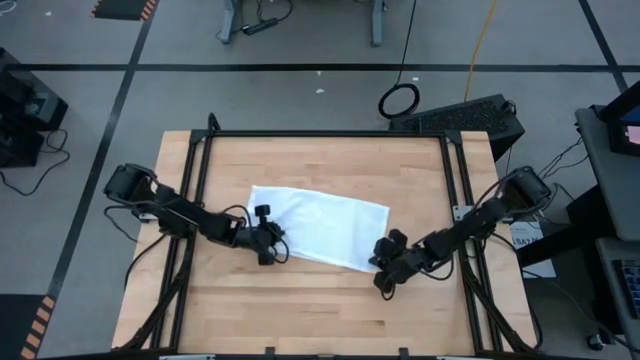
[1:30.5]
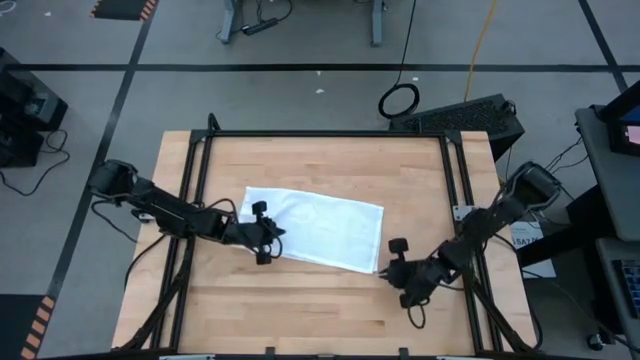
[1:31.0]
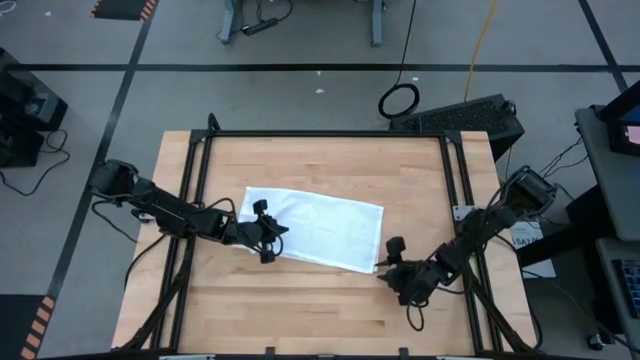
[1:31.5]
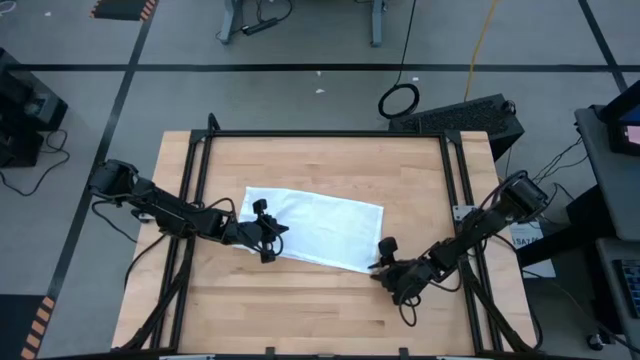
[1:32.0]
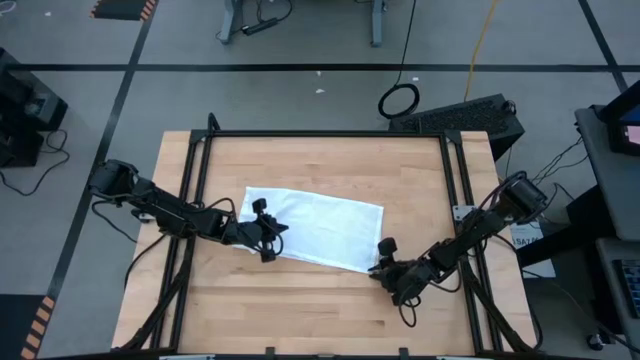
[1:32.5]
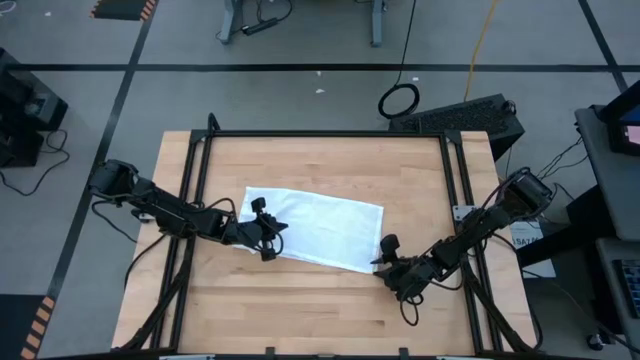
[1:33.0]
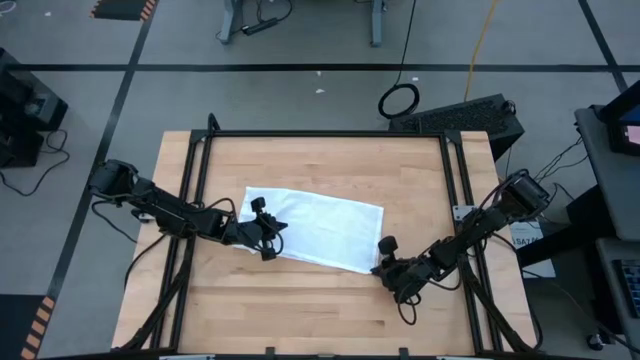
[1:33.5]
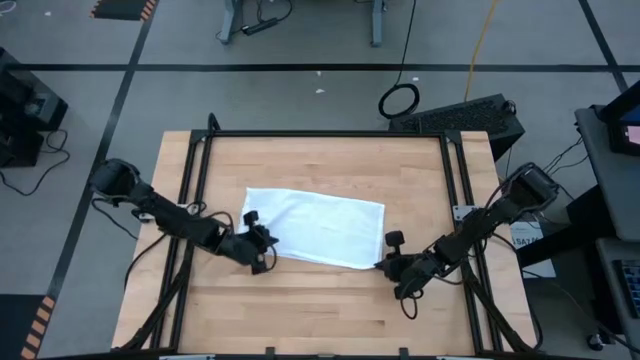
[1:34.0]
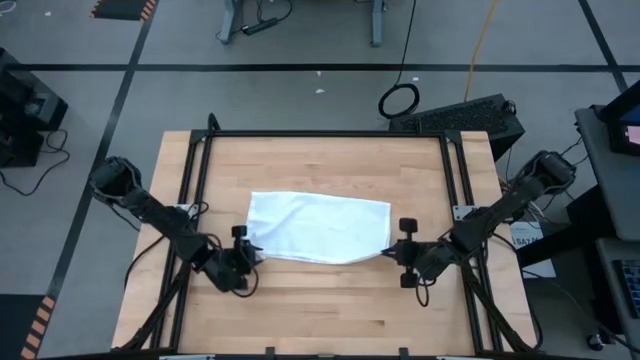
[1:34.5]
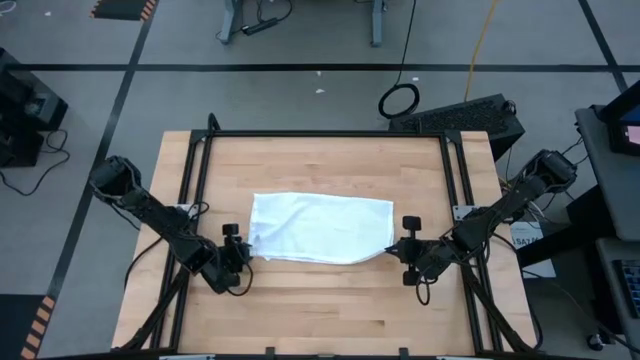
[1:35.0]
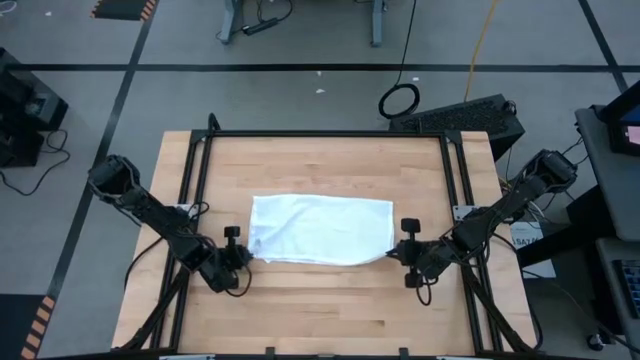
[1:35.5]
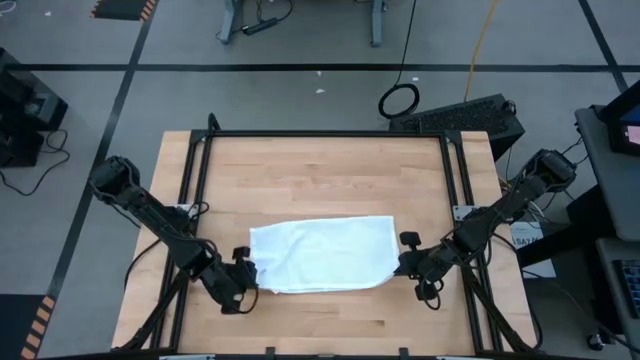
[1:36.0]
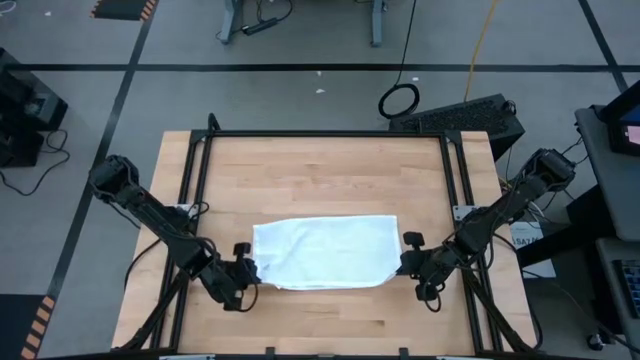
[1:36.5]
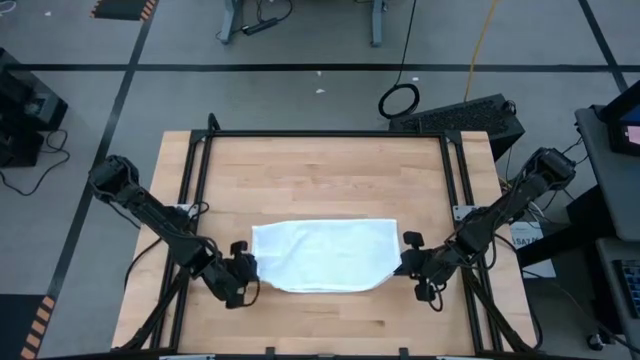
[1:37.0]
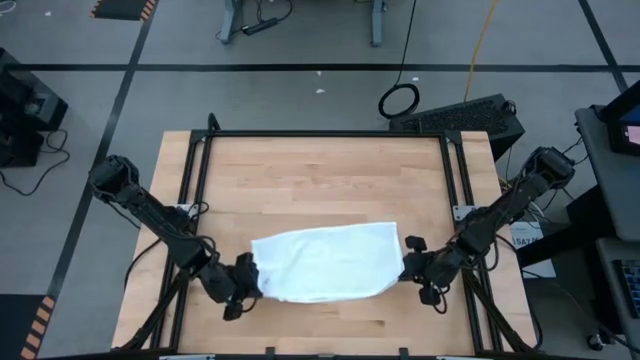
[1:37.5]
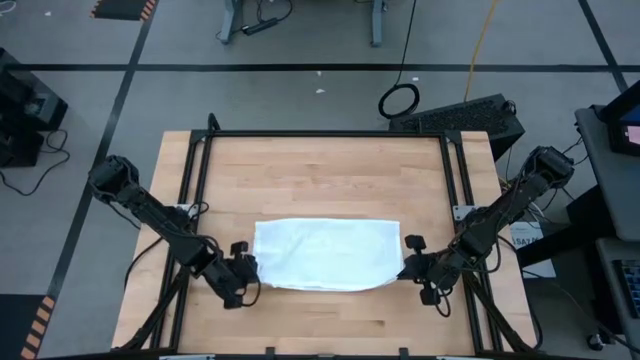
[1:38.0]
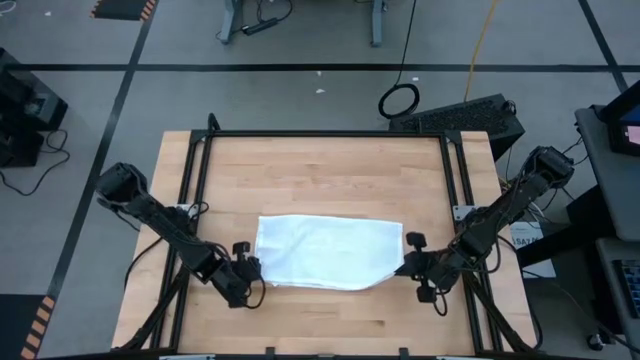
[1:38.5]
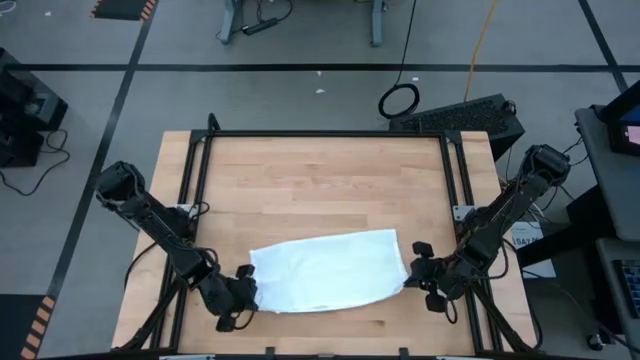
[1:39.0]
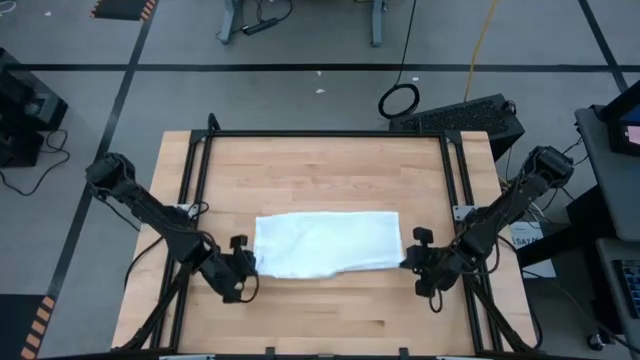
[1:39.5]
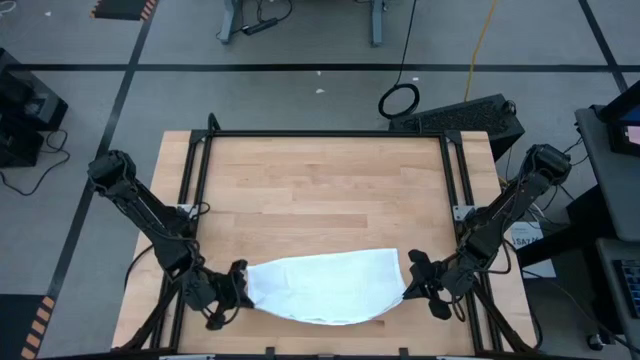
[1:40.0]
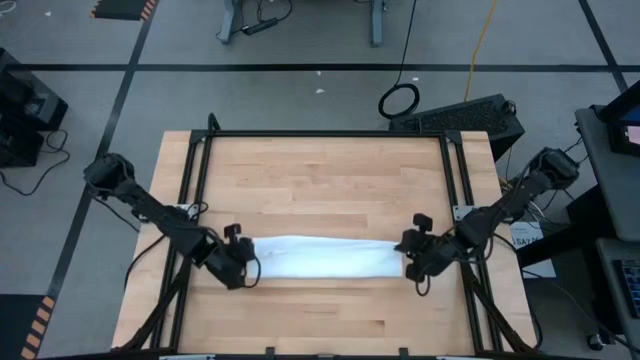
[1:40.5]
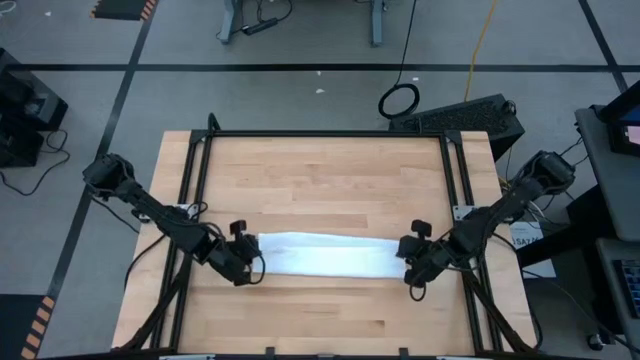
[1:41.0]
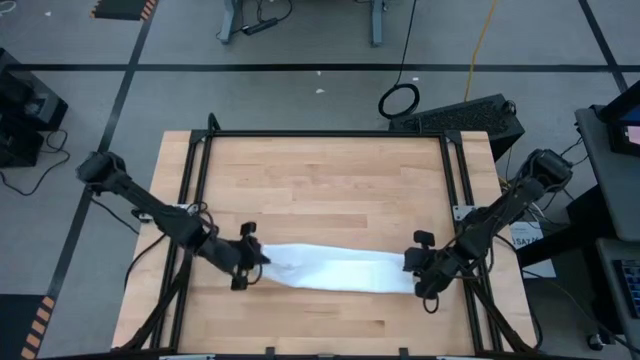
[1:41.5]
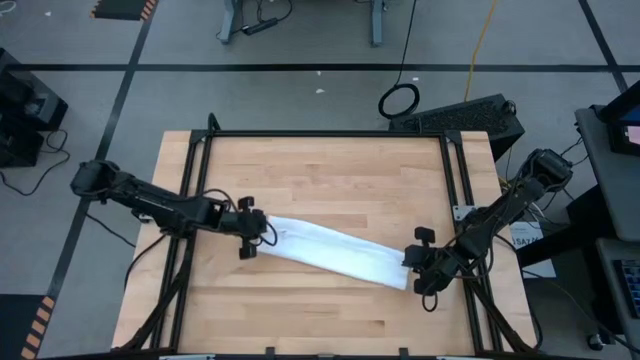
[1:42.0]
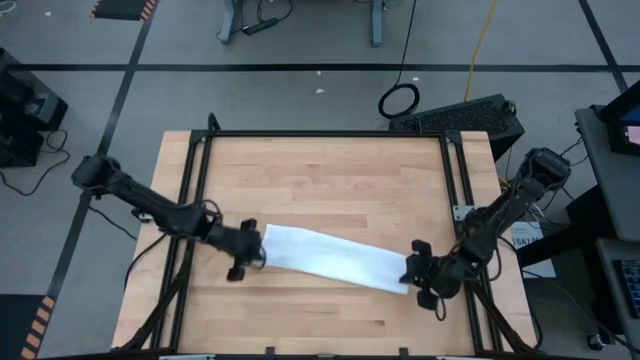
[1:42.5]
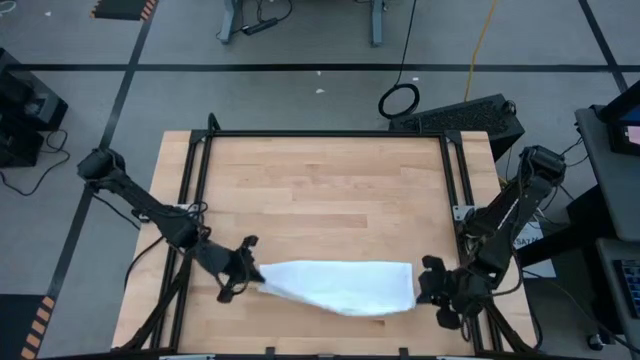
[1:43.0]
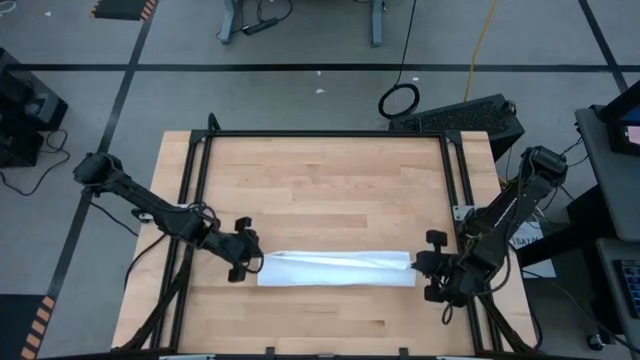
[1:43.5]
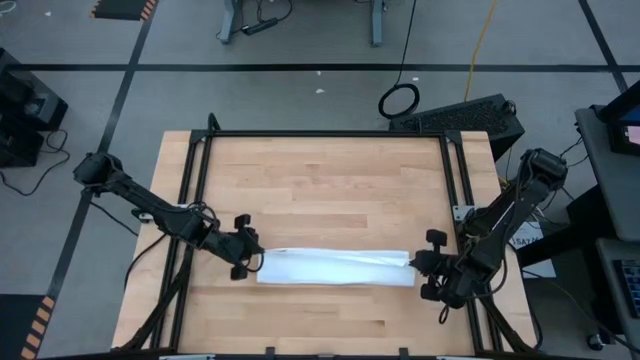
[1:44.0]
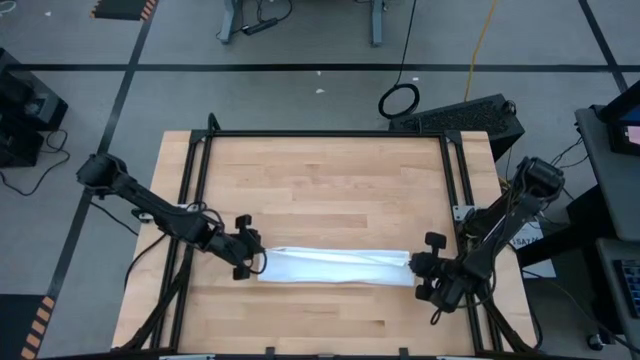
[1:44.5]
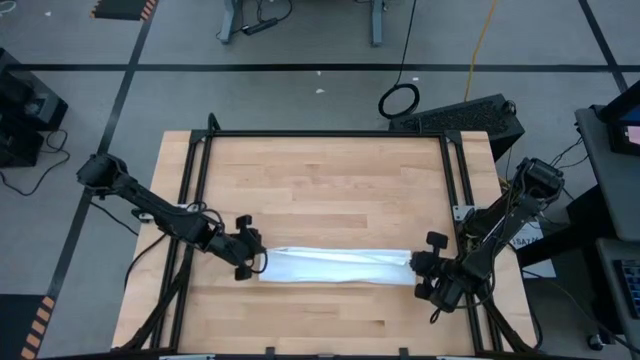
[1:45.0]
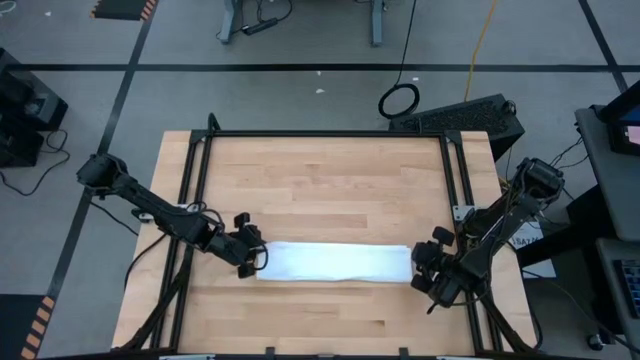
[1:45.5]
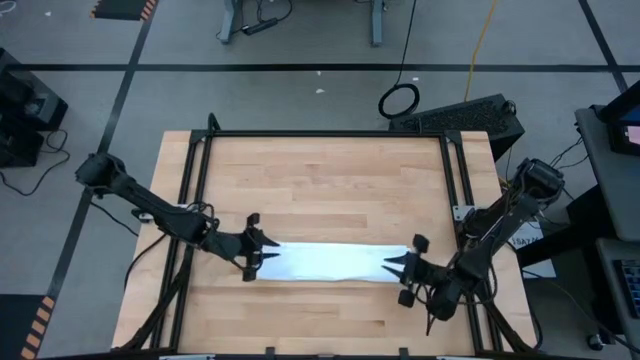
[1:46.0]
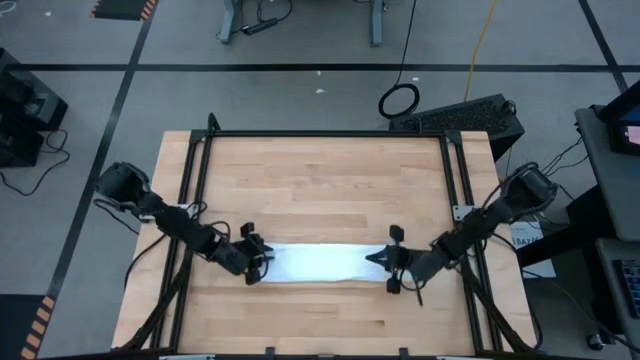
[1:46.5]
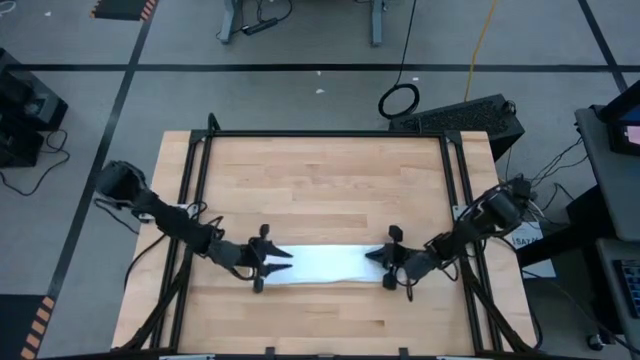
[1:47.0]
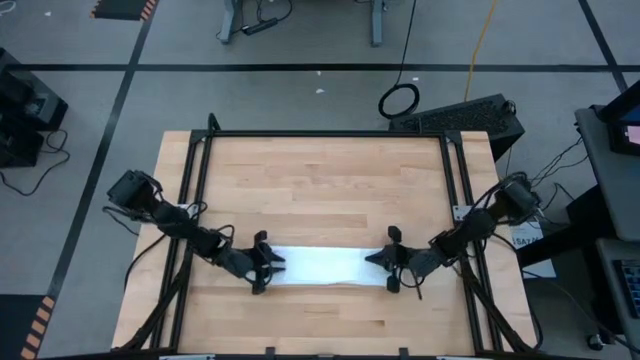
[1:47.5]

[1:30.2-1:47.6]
Task: Roll napkin
Fold the white table napkin

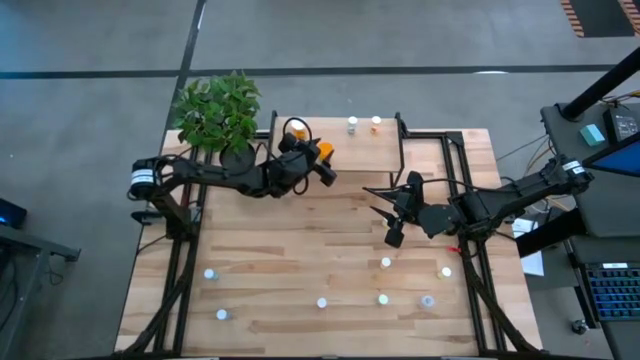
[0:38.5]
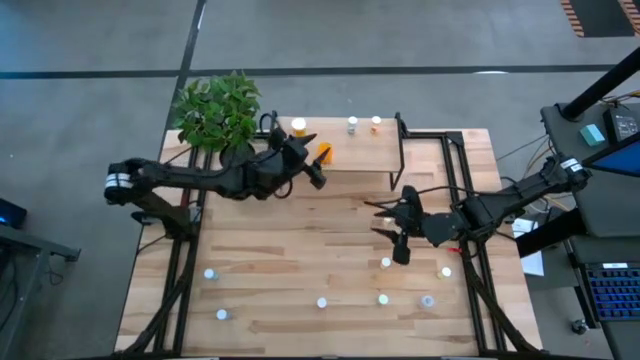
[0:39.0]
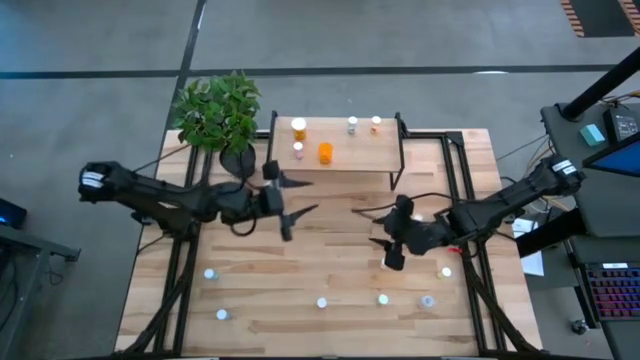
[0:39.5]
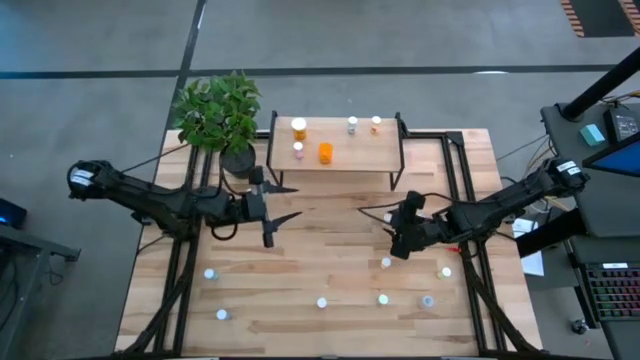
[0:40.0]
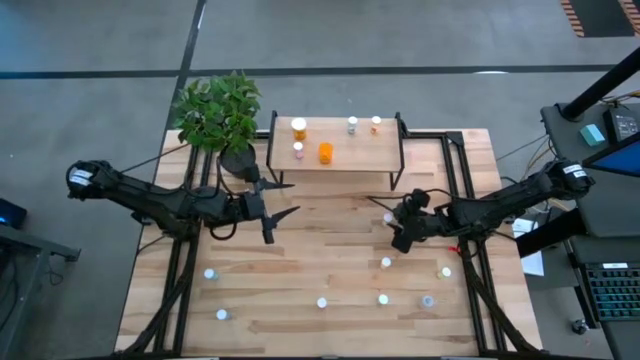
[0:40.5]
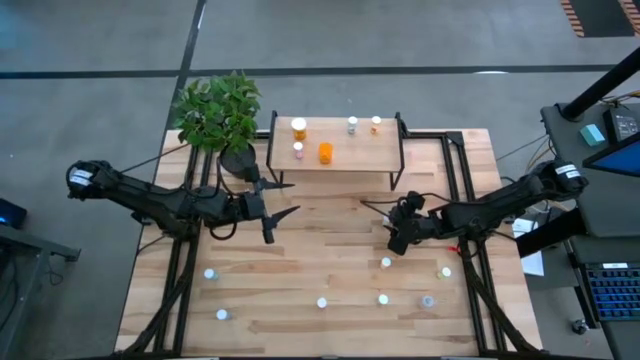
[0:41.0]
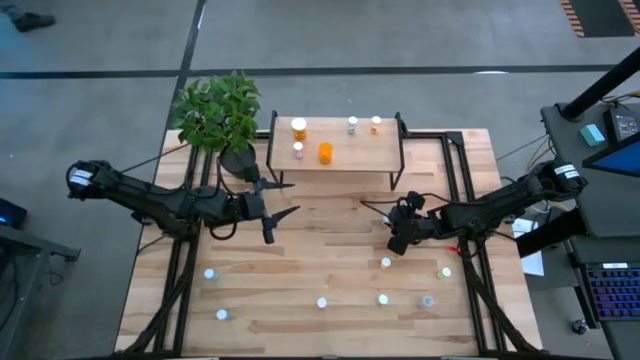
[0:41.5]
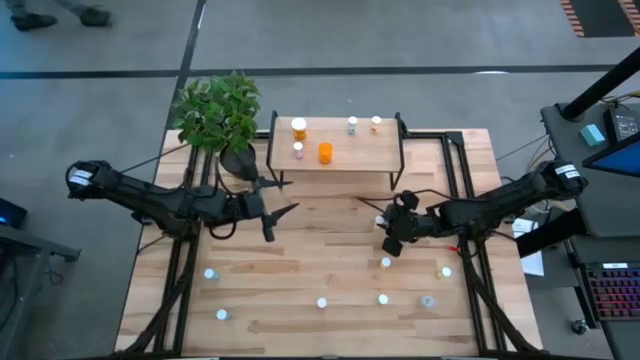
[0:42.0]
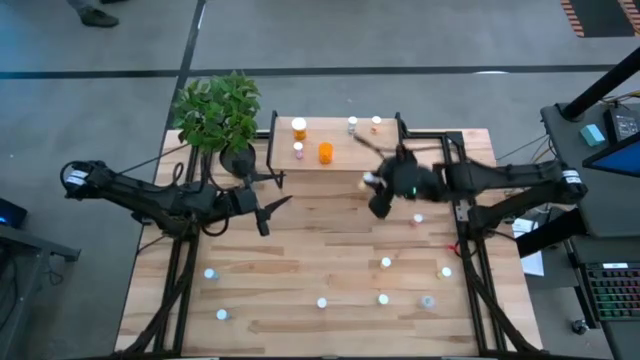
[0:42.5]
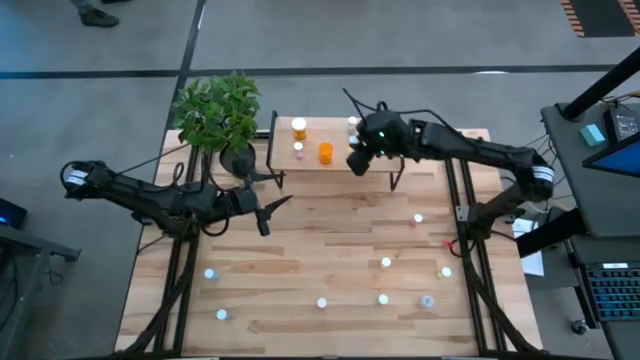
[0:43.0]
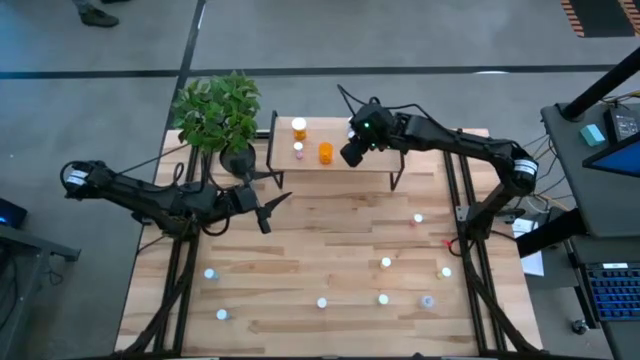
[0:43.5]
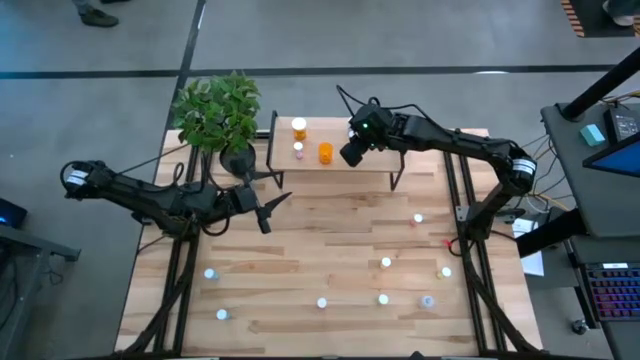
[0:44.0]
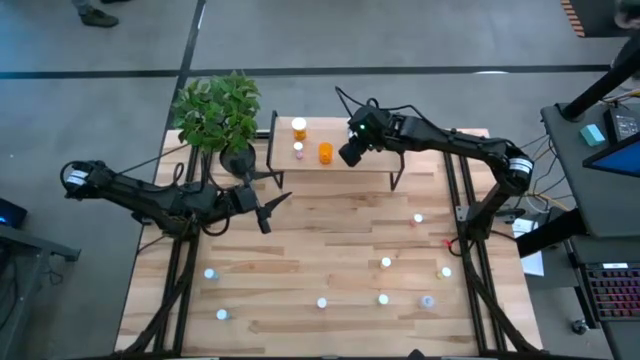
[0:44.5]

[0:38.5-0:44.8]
Task: Pick and place medicine bottles onto shelf by color
Put the yellow pill bottle on the shelf
